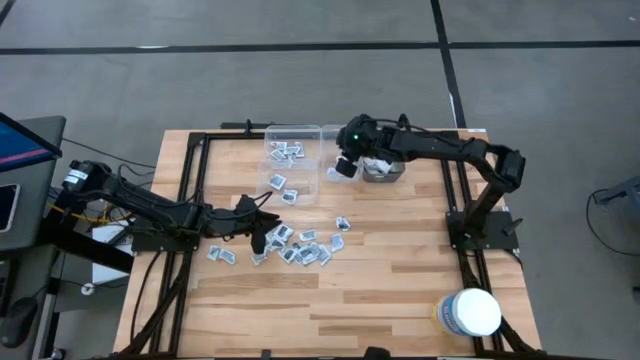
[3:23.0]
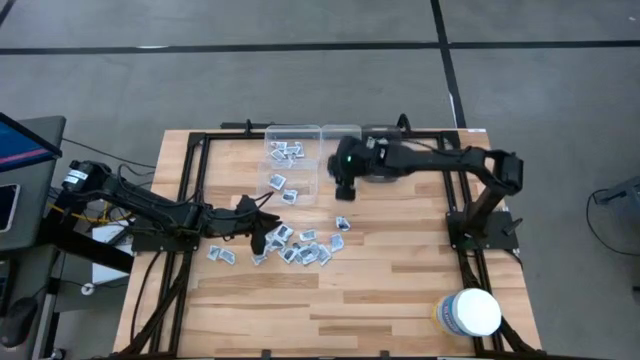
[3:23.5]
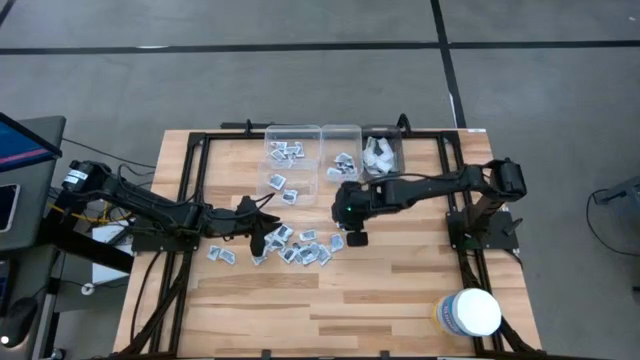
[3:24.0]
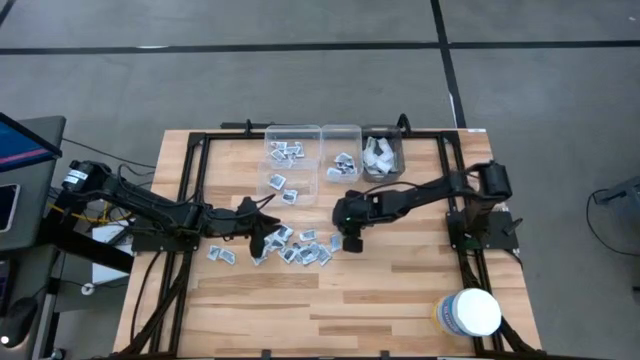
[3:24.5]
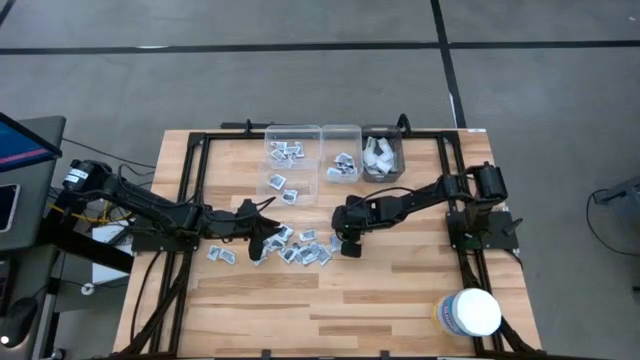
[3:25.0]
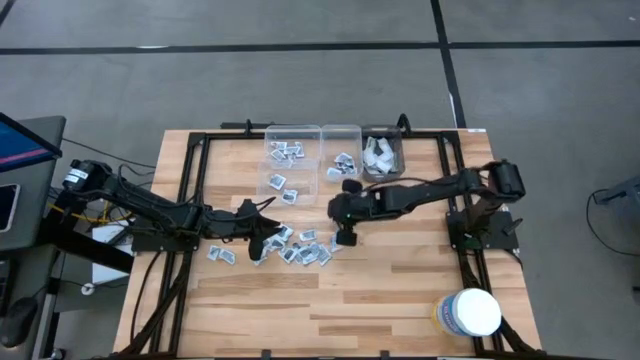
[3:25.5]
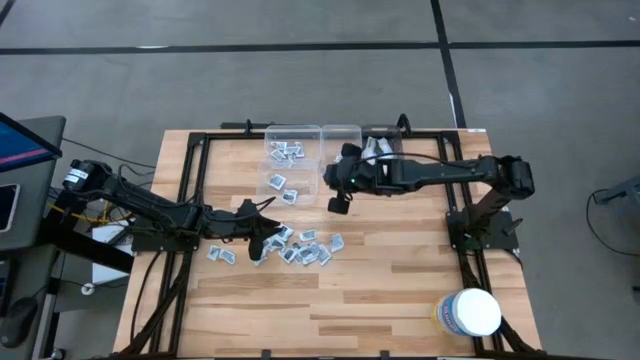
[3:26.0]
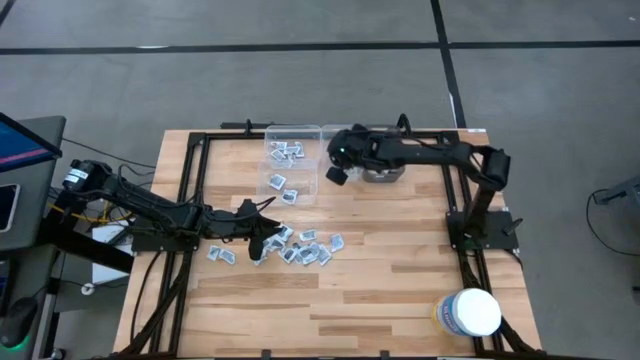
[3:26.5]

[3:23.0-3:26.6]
Task: Pick & Place First Aid Supplies
Put the alcohol pad into the top right transparent bin

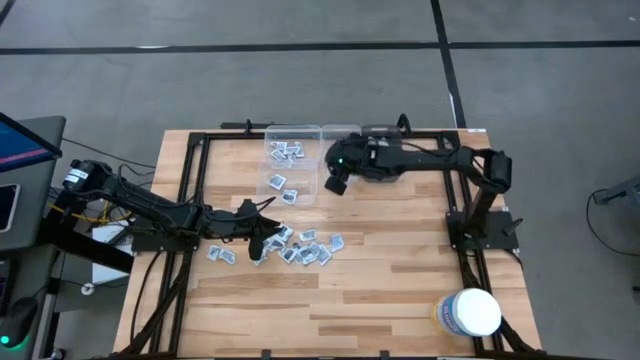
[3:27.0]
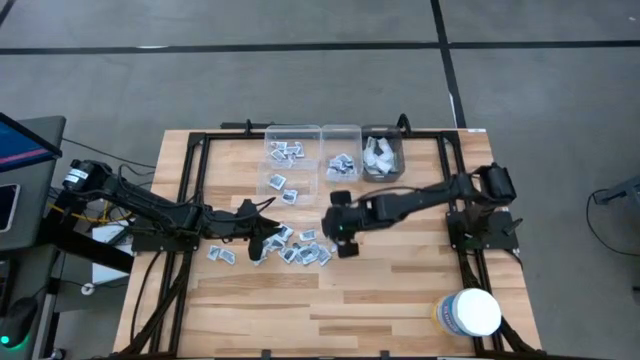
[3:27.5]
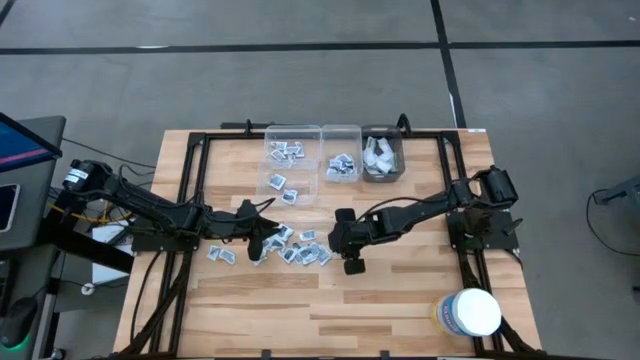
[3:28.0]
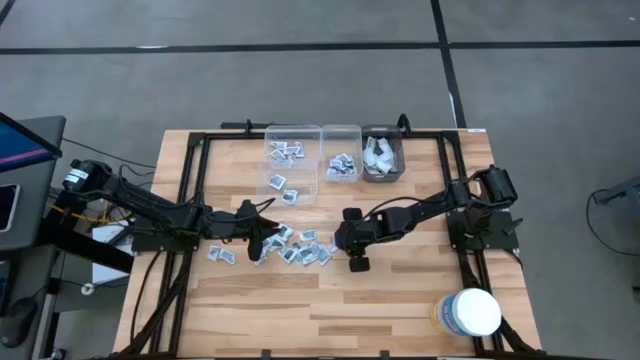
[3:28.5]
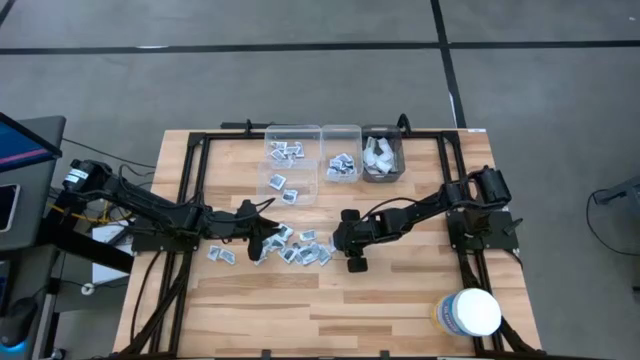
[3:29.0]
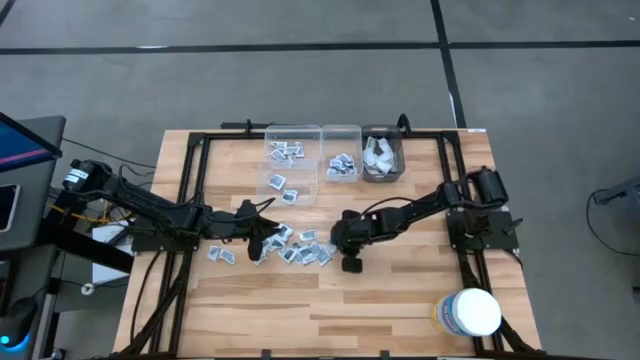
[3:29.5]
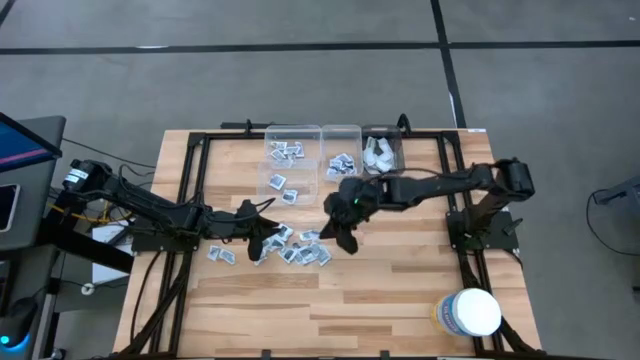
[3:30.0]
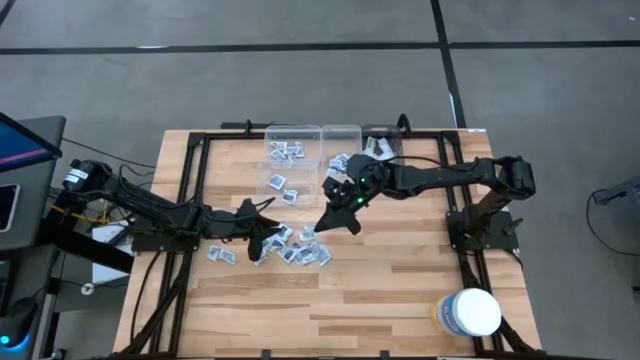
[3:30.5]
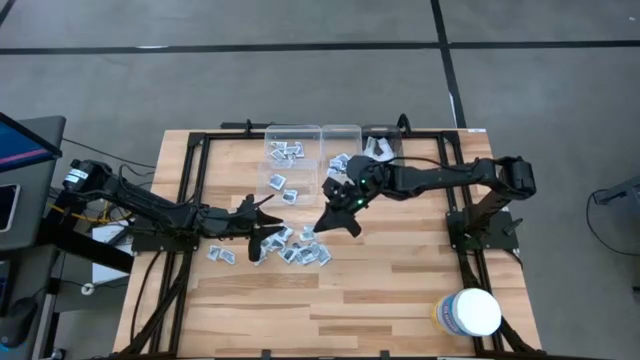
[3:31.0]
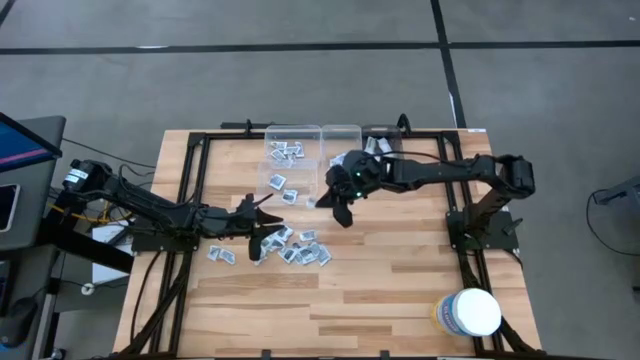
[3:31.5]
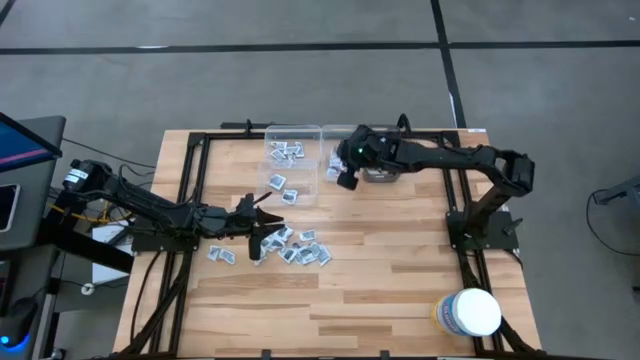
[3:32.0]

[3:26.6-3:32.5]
Put the alcohol pad into the top right transparent bin

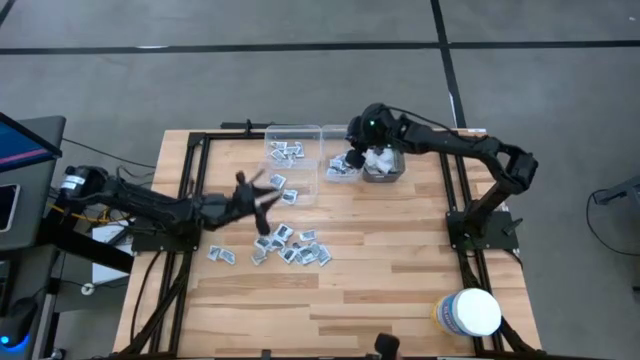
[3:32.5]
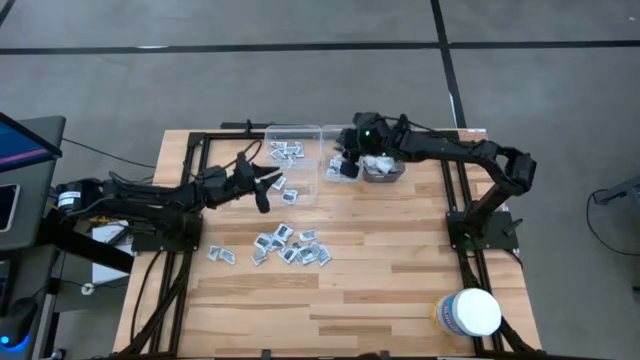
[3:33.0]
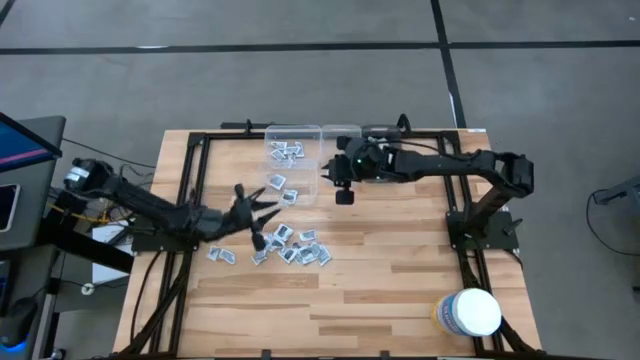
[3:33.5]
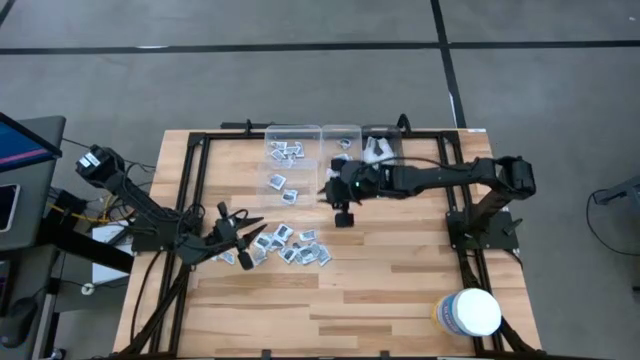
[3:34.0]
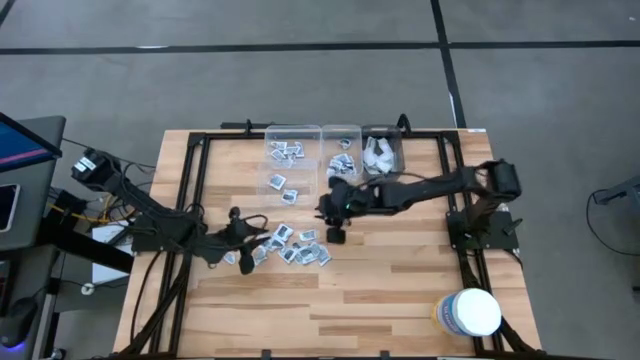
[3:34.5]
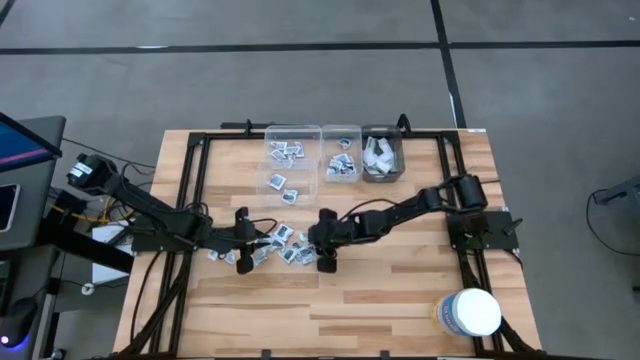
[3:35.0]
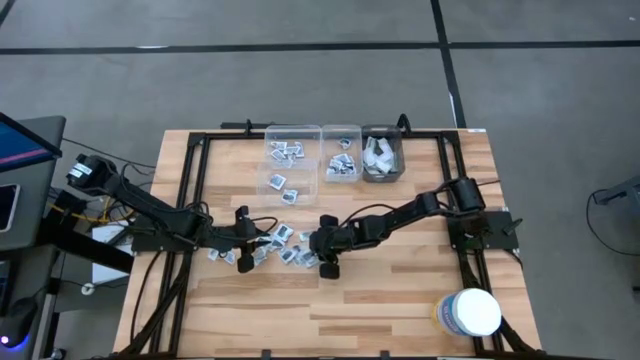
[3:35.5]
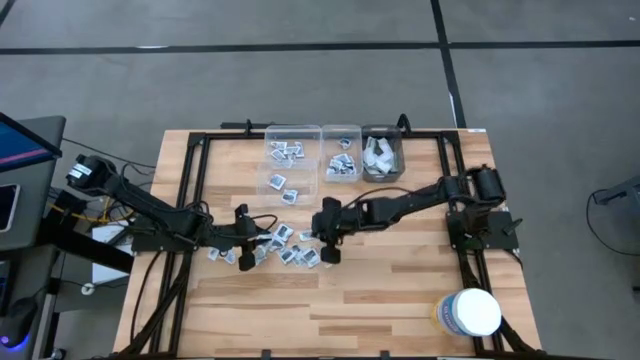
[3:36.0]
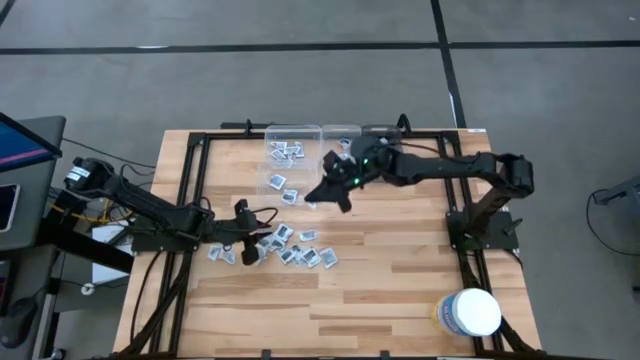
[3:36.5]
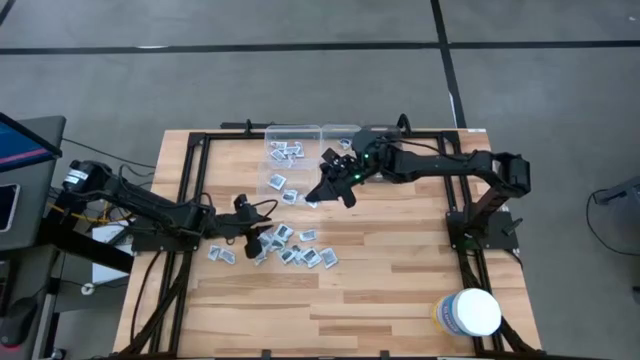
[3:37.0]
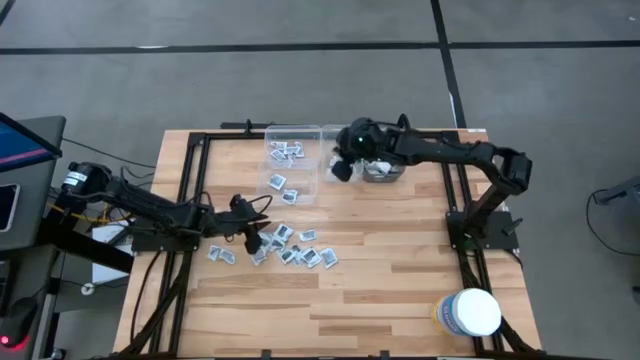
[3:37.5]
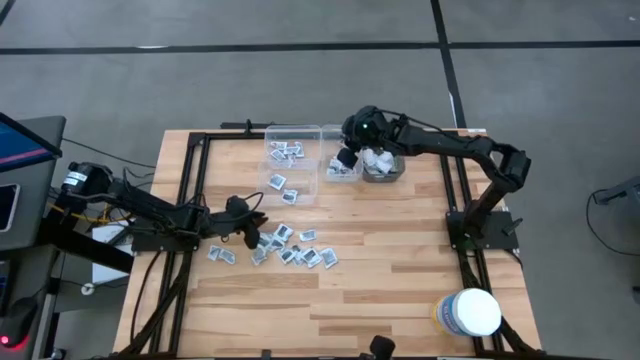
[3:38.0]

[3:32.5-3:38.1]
Put the alcohol pad into the top right transparent bin

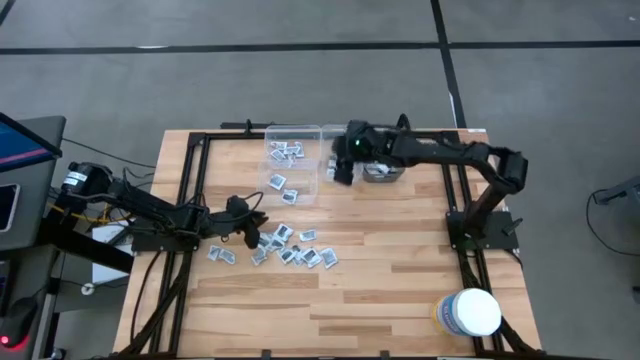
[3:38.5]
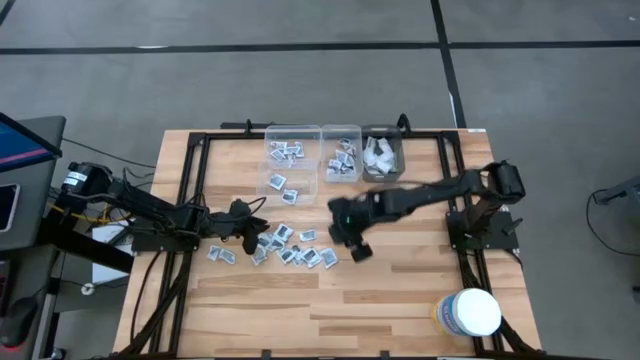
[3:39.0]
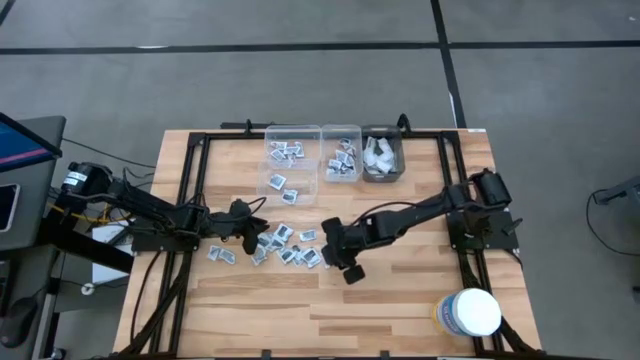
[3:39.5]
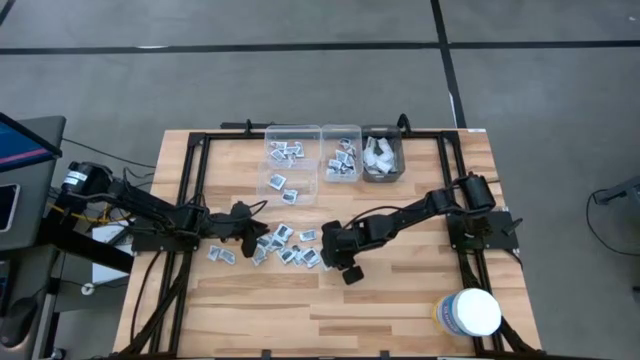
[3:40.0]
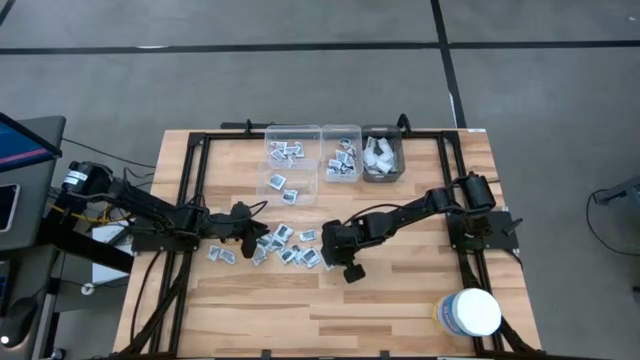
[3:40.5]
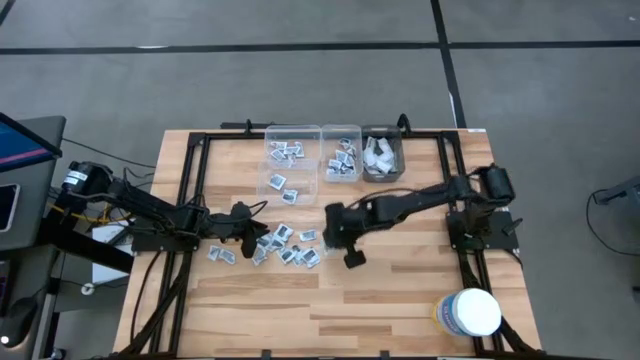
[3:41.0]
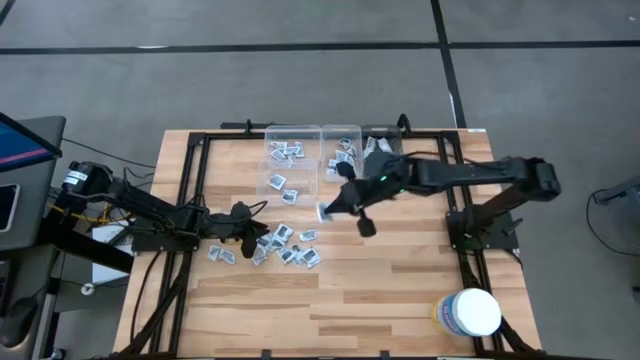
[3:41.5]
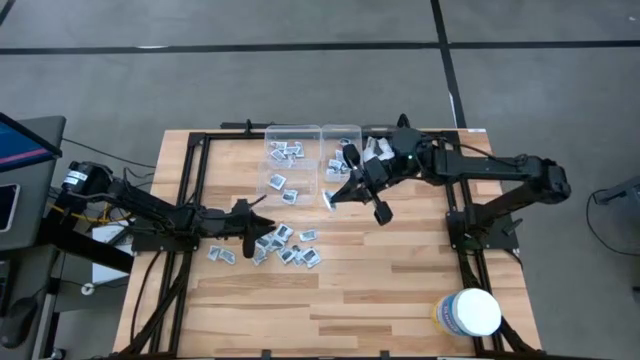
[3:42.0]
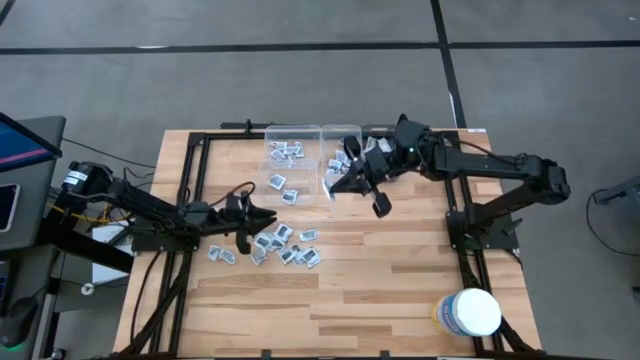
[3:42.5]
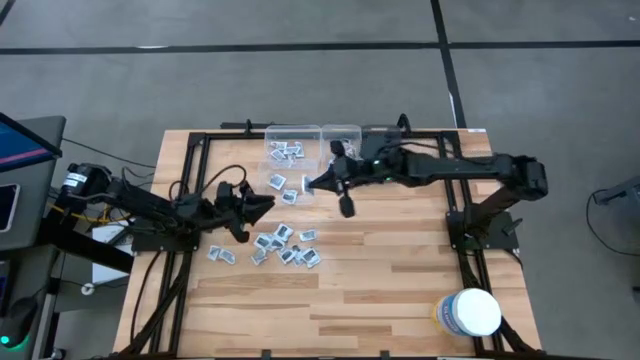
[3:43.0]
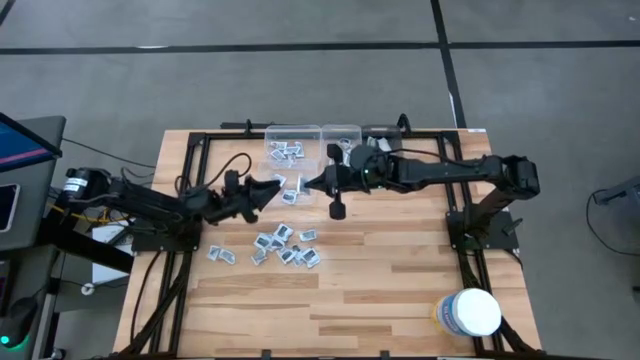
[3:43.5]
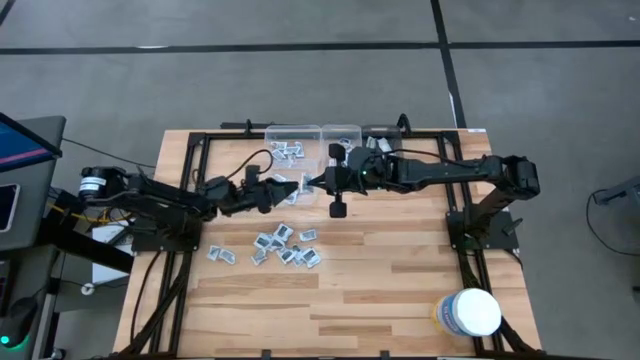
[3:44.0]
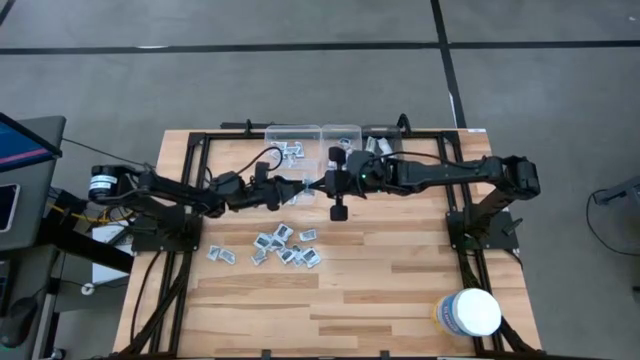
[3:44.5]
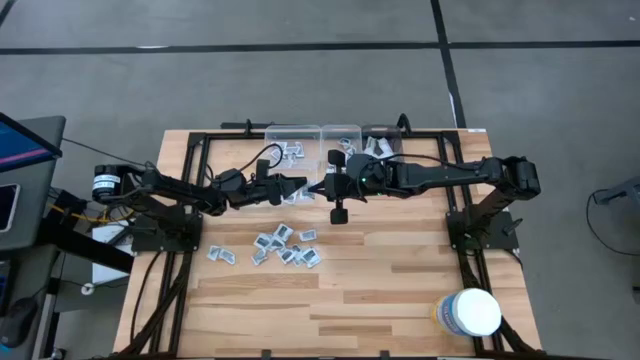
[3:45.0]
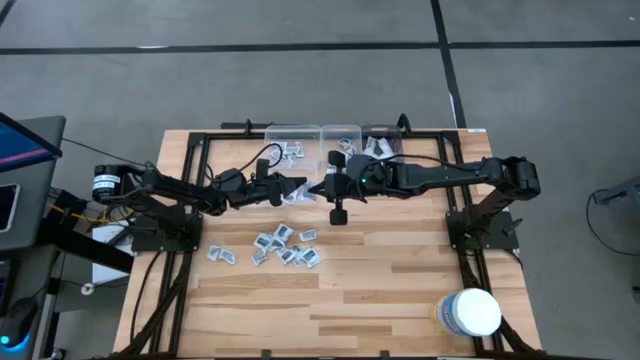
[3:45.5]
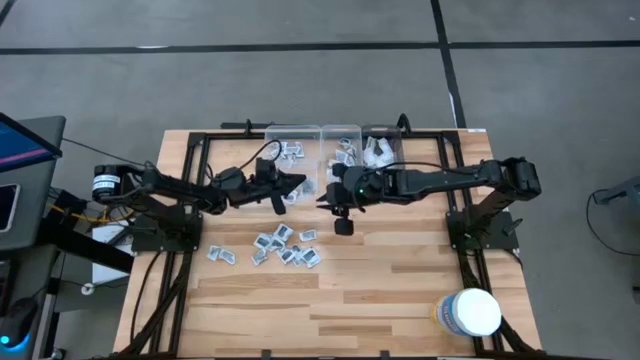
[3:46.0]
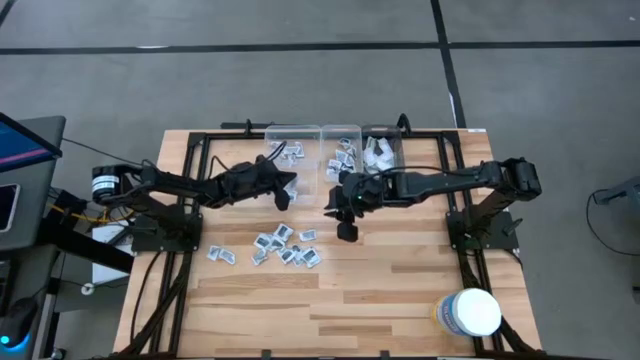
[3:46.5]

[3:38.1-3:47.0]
Put the towelette pack into the bottom transparent bin
